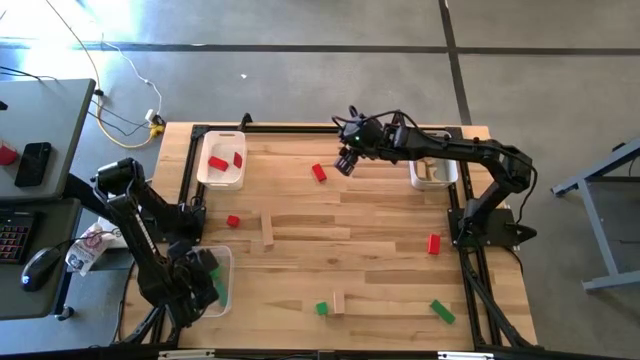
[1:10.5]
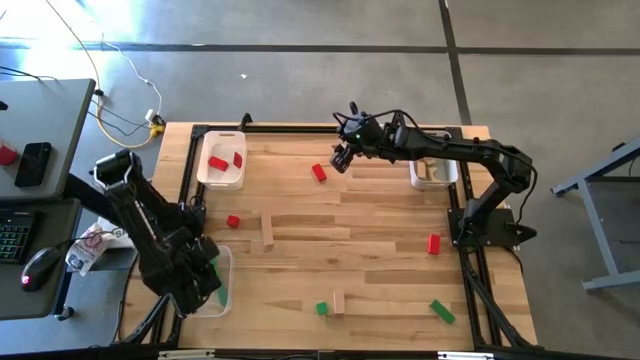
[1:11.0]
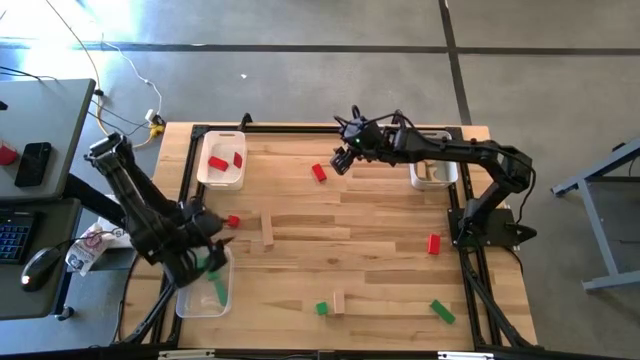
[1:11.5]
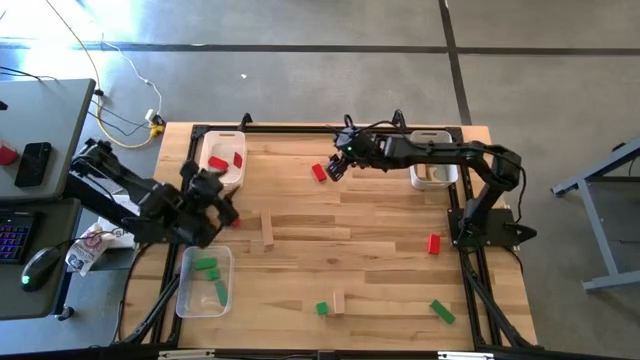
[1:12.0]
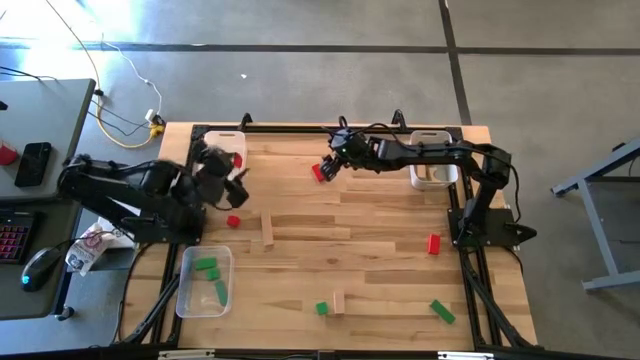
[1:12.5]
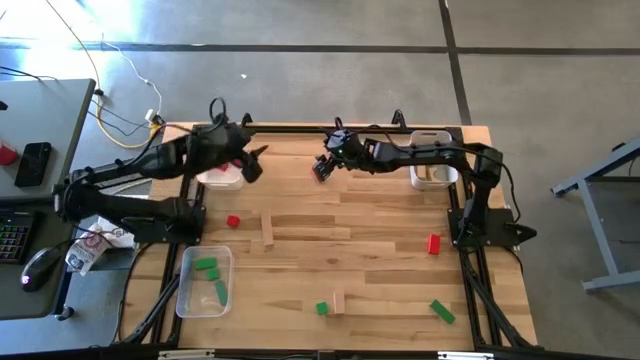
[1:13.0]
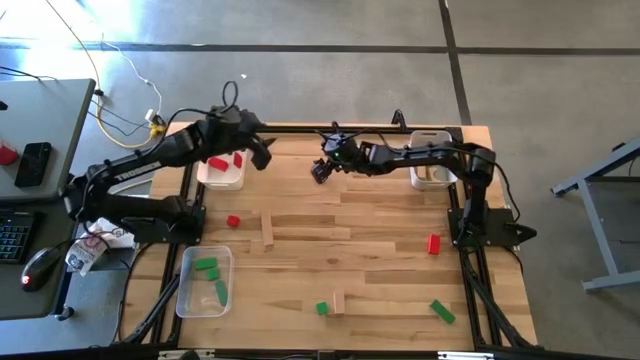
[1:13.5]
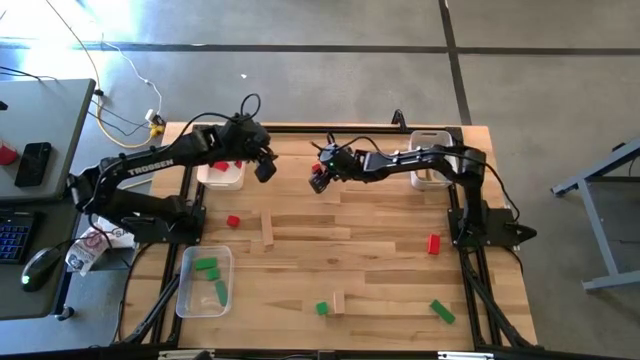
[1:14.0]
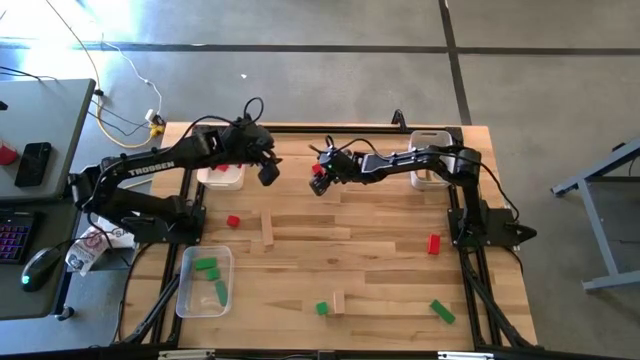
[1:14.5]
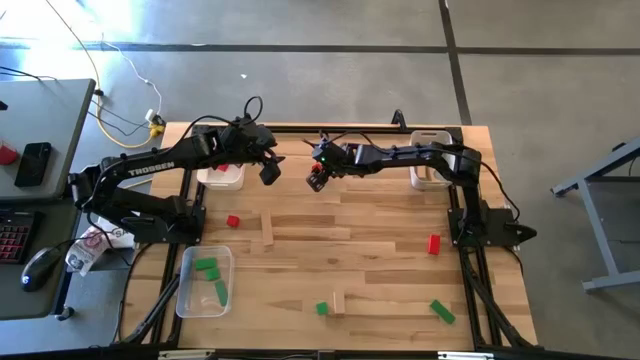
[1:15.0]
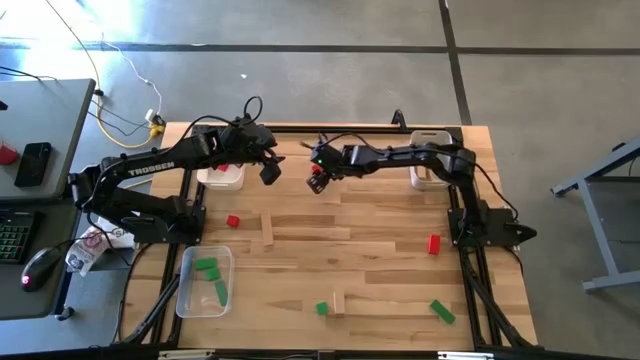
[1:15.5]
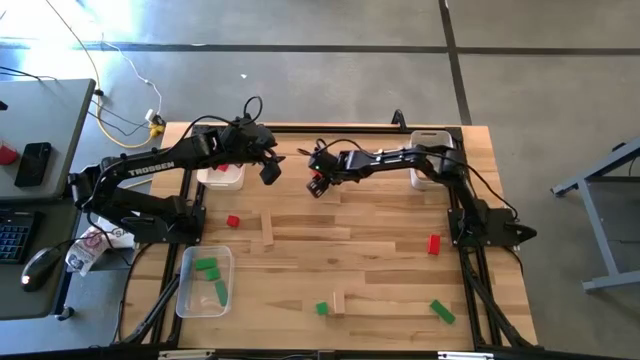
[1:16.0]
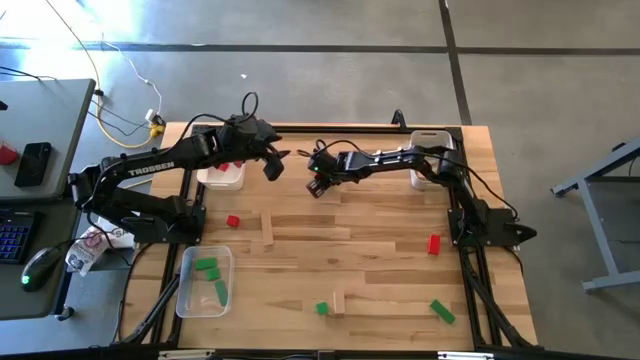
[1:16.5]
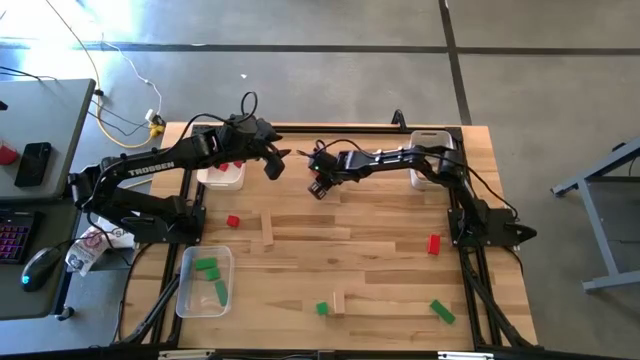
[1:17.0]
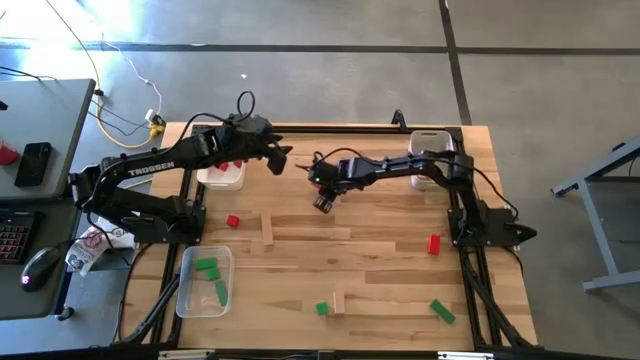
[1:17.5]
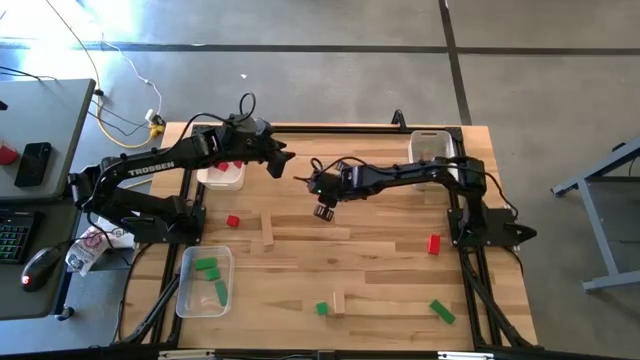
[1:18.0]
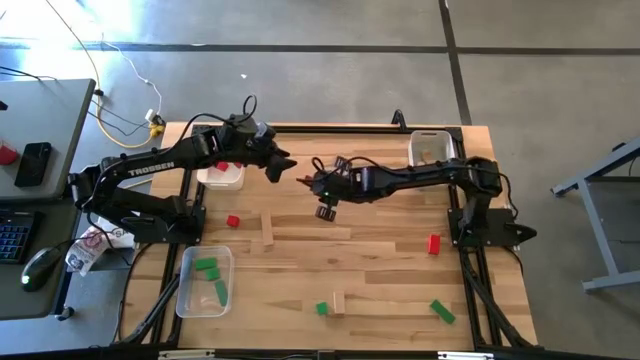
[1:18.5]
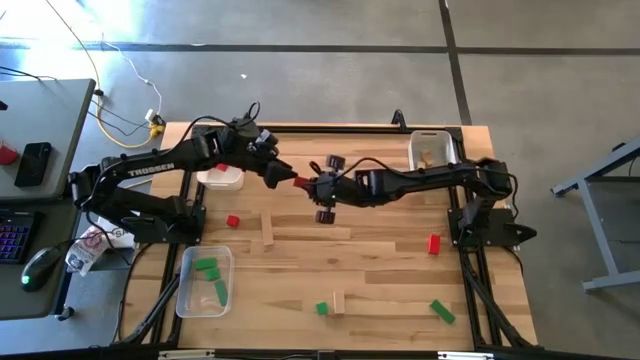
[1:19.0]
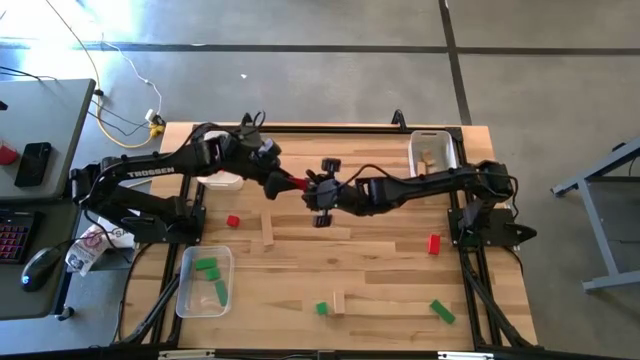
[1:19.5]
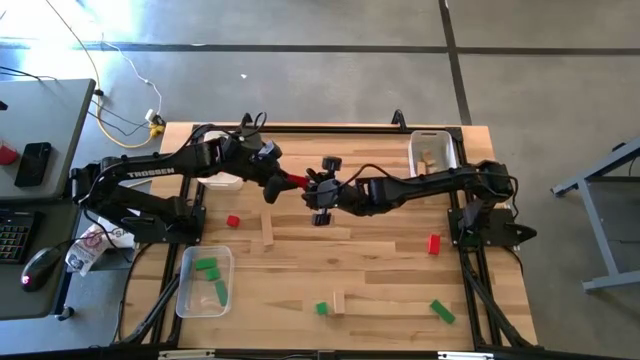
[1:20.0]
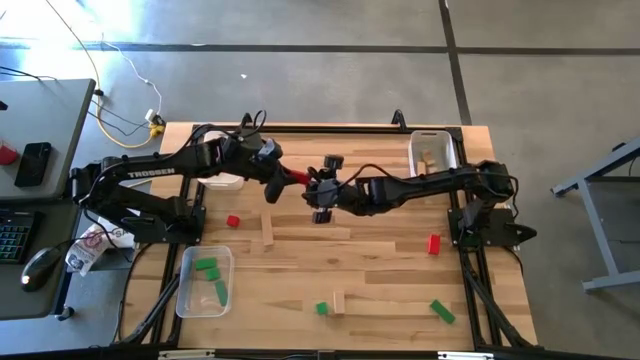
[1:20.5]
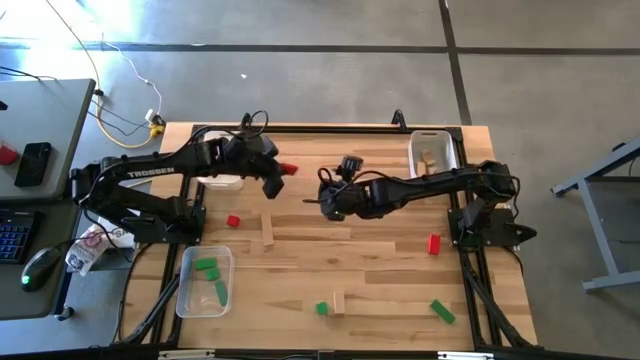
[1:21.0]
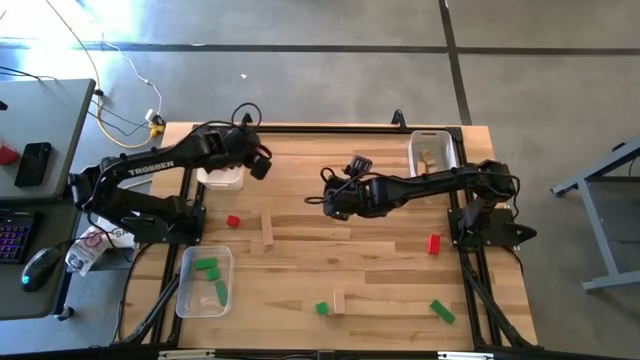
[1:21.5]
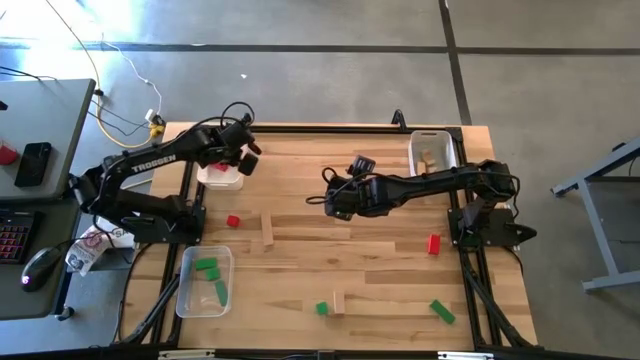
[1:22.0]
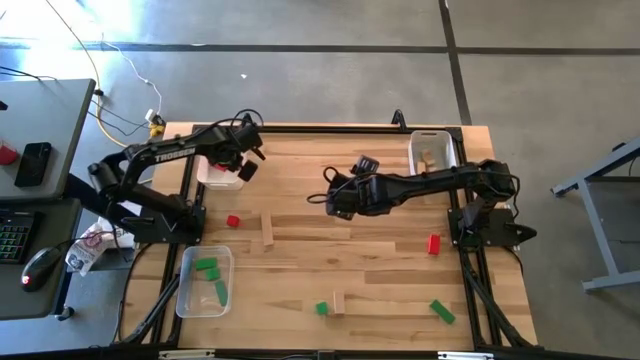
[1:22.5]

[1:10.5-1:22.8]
Task: Sort & place blocks by color
Put the red block into the white bin

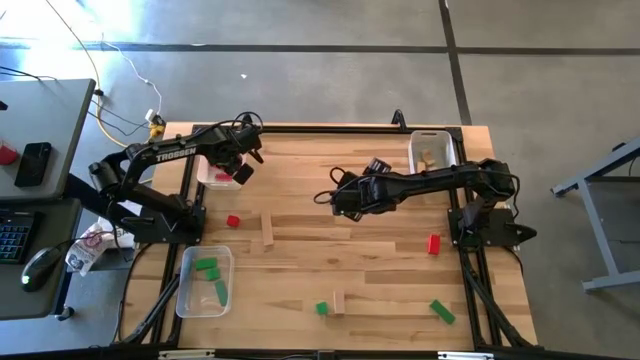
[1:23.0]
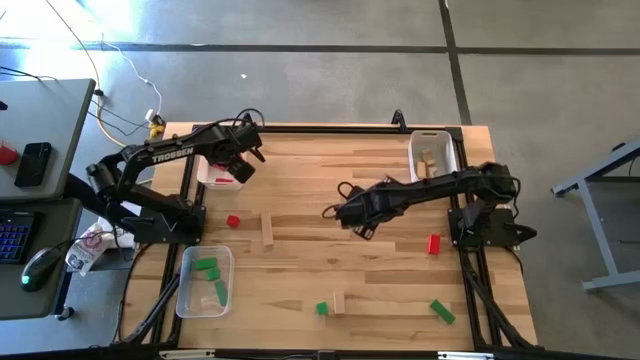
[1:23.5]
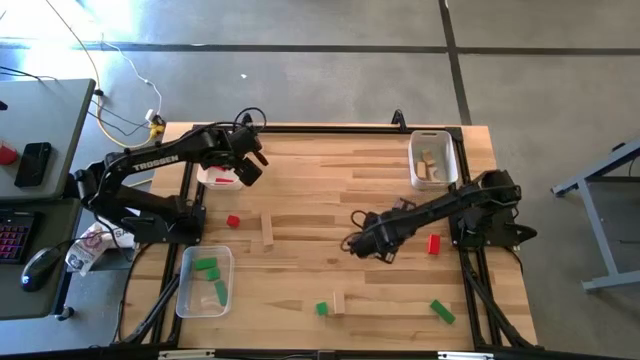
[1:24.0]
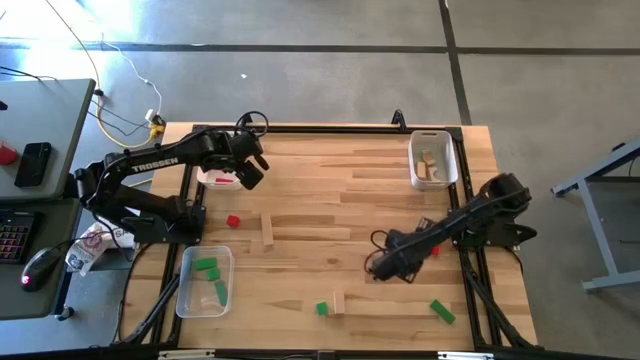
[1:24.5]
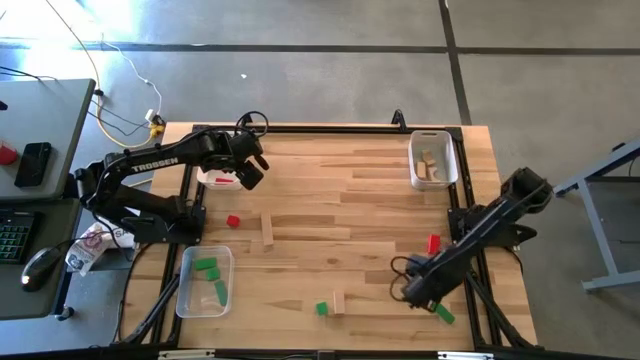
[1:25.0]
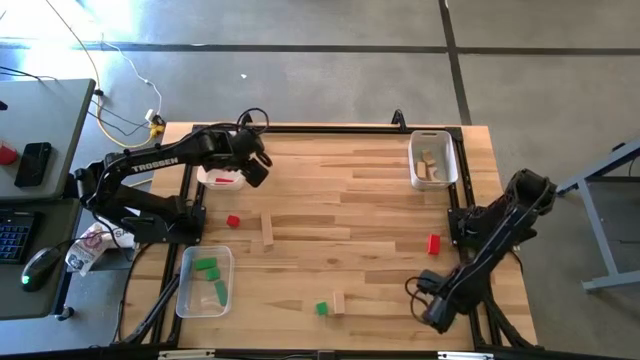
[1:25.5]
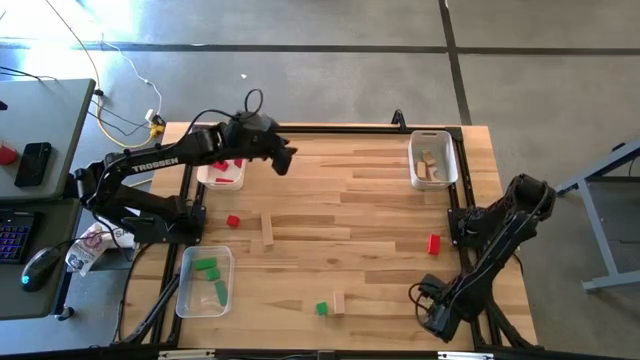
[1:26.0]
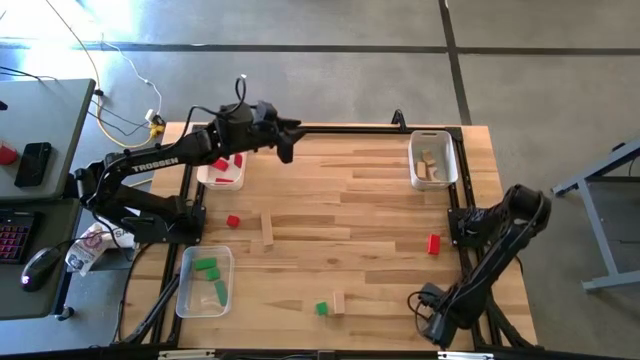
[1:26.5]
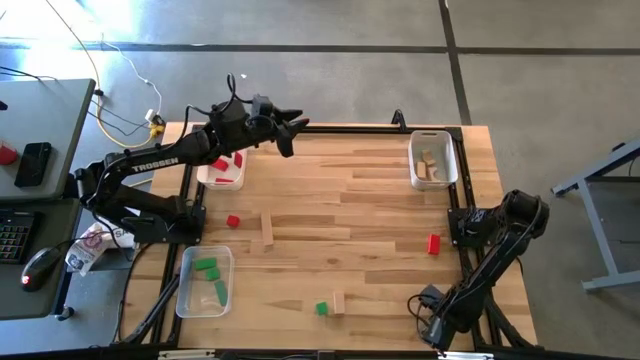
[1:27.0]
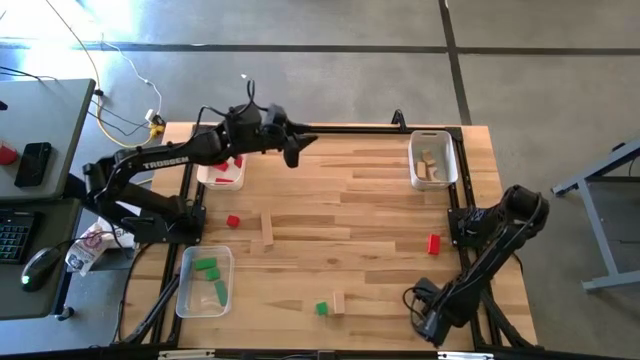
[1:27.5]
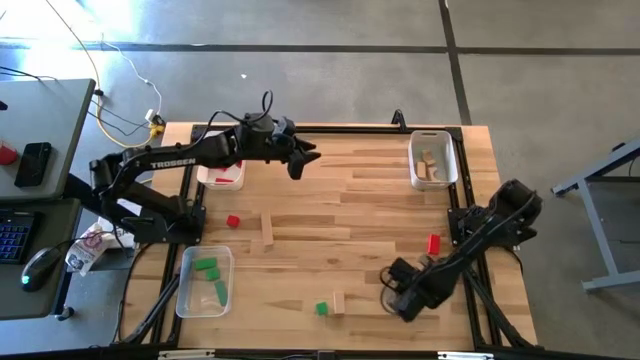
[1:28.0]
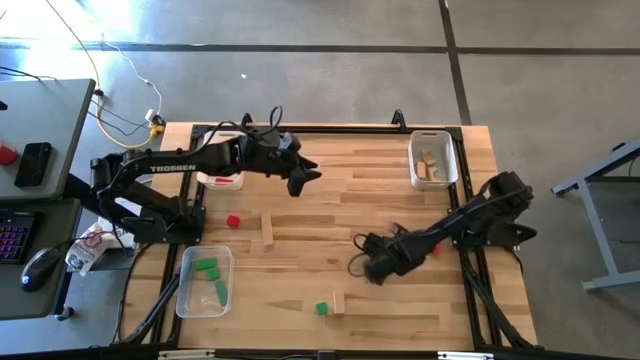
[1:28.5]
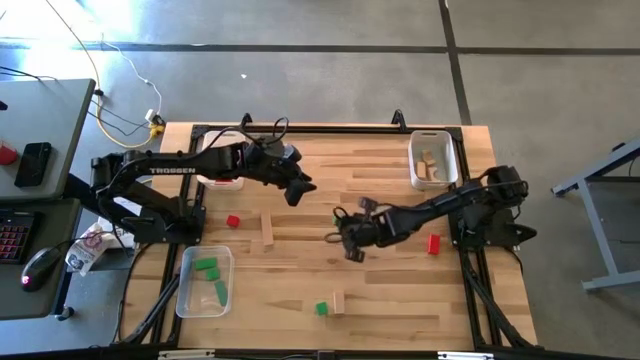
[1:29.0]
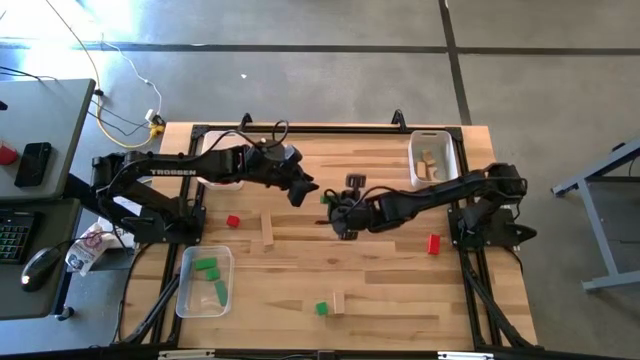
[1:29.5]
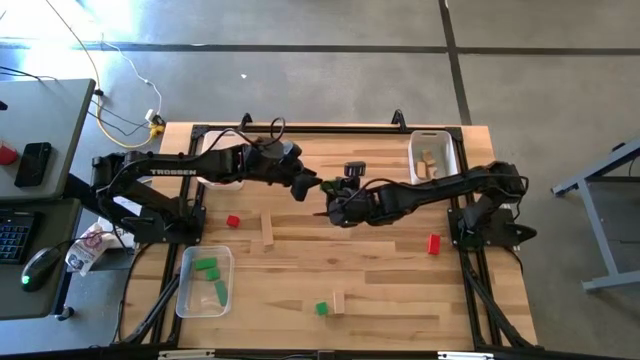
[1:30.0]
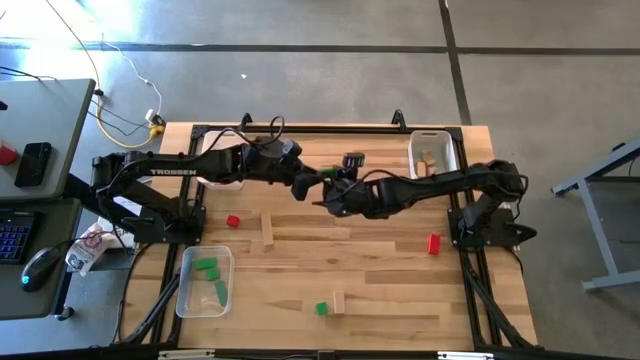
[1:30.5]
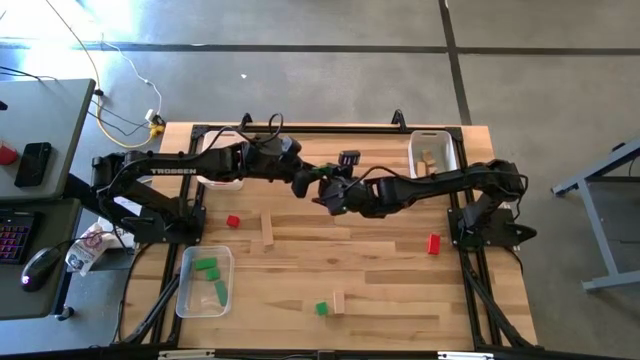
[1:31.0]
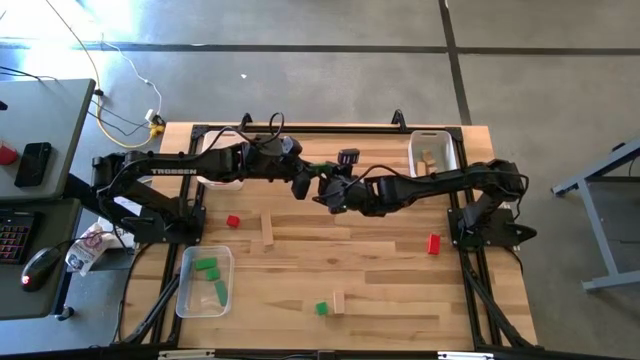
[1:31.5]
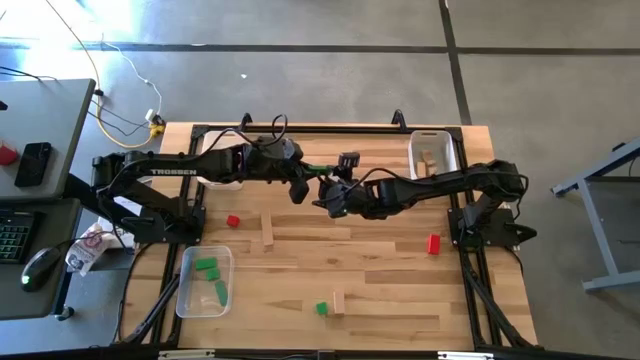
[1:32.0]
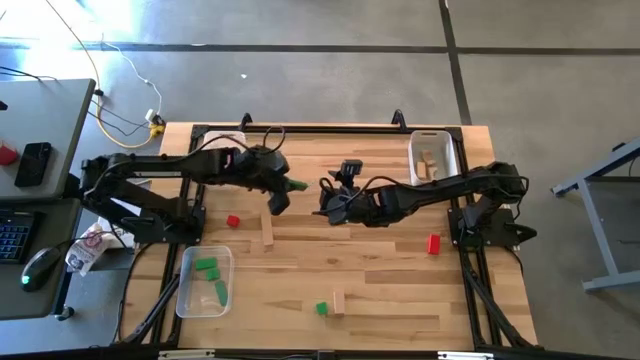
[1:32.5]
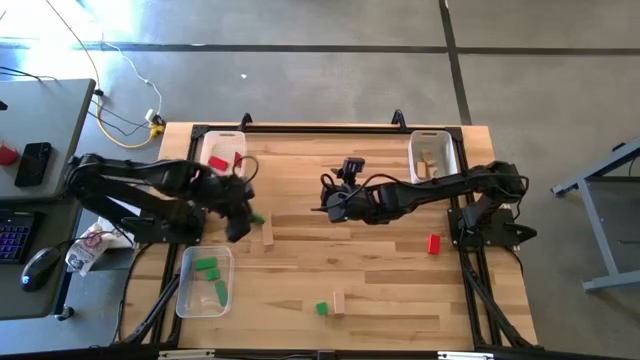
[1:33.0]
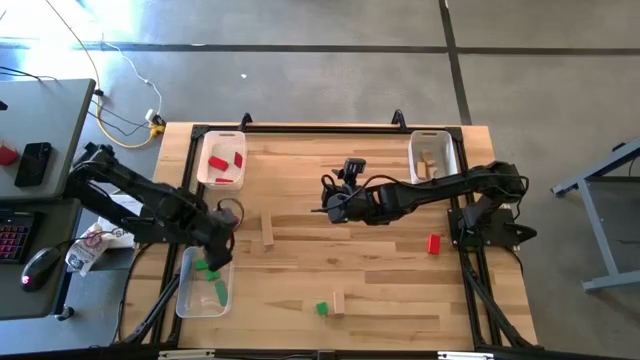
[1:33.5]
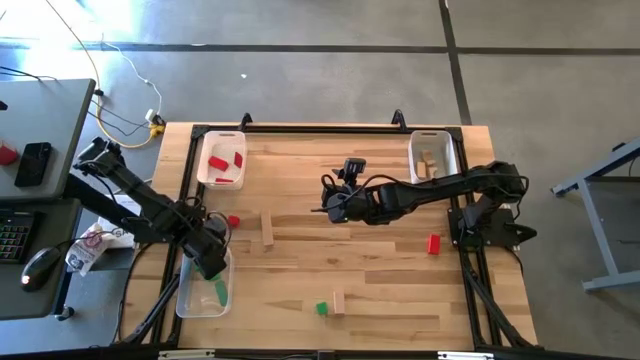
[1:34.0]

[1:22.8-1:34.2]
Put the green block into the transparent bin
